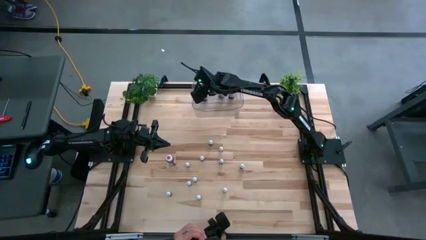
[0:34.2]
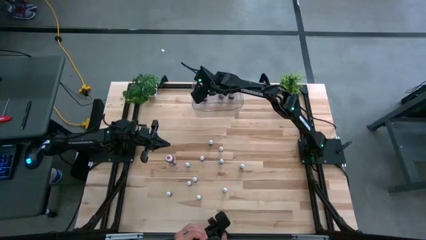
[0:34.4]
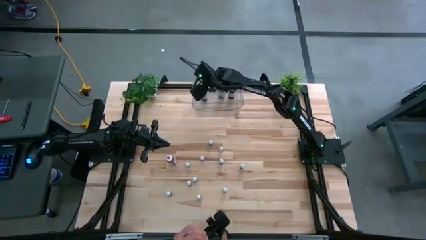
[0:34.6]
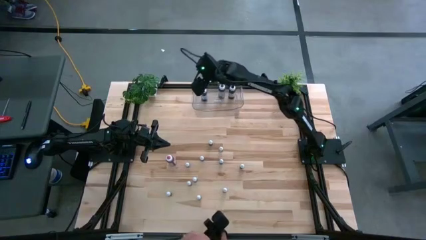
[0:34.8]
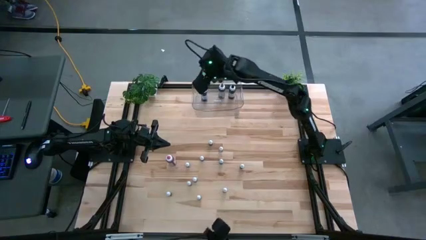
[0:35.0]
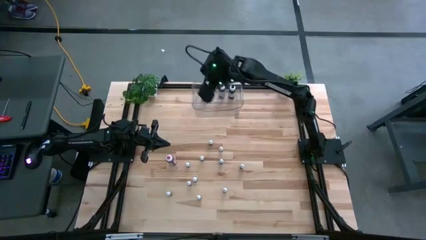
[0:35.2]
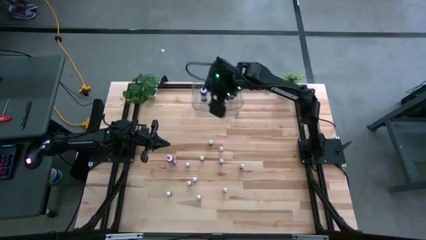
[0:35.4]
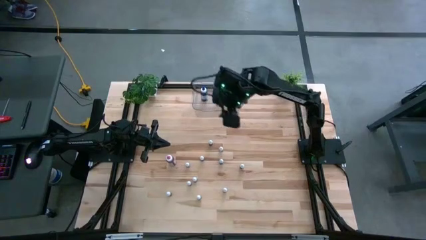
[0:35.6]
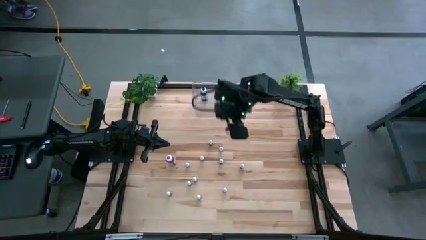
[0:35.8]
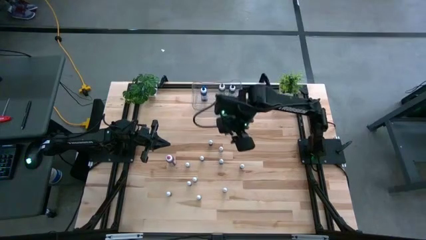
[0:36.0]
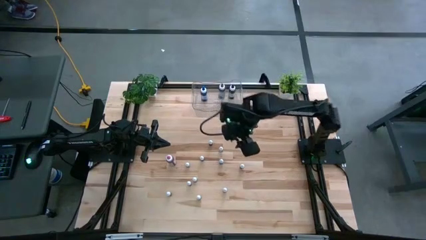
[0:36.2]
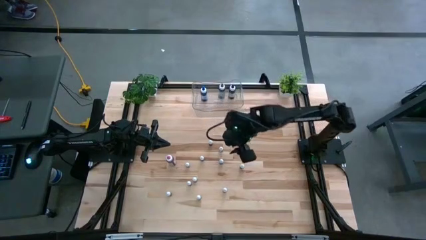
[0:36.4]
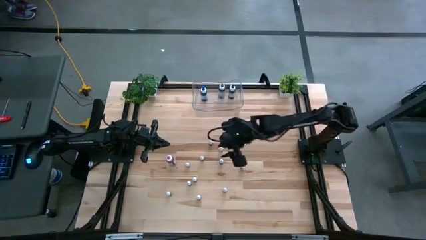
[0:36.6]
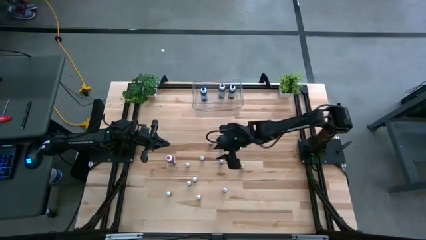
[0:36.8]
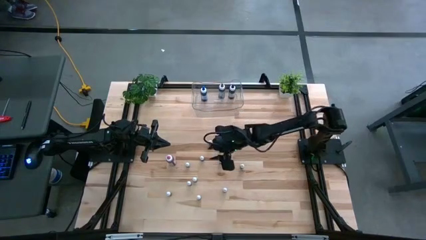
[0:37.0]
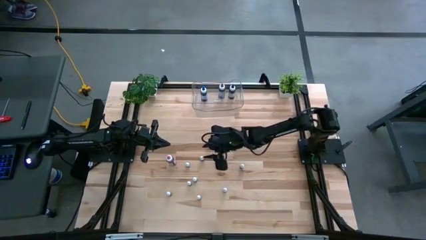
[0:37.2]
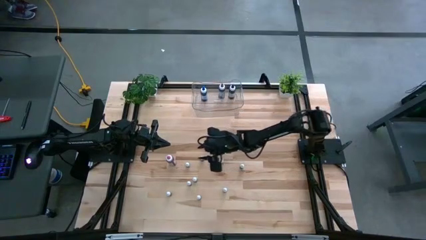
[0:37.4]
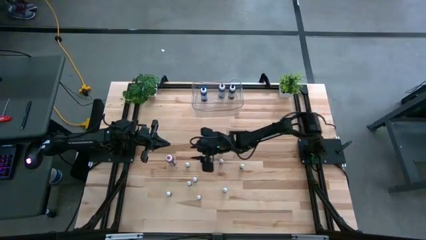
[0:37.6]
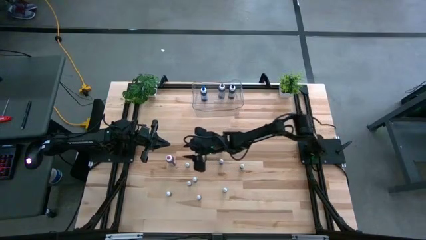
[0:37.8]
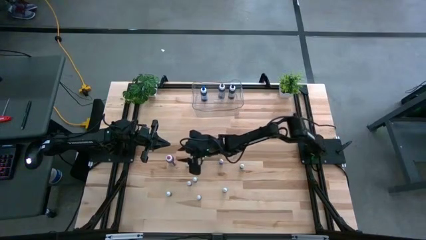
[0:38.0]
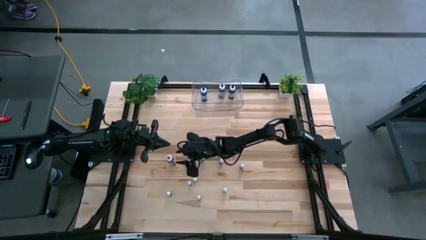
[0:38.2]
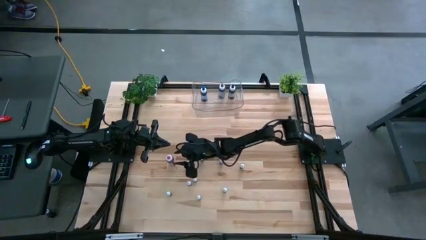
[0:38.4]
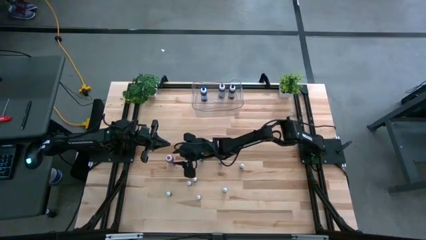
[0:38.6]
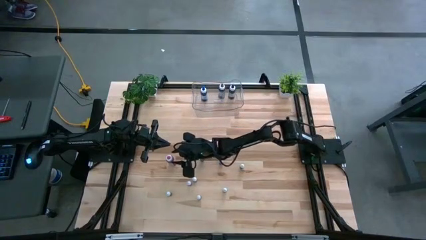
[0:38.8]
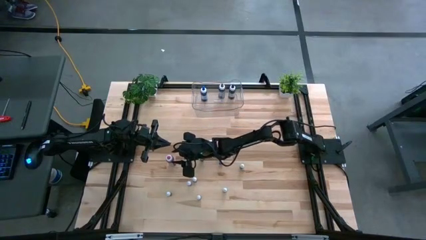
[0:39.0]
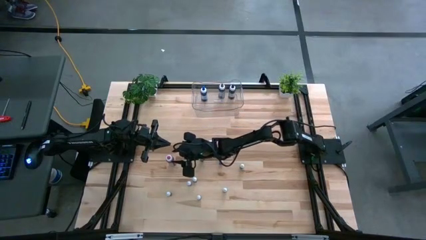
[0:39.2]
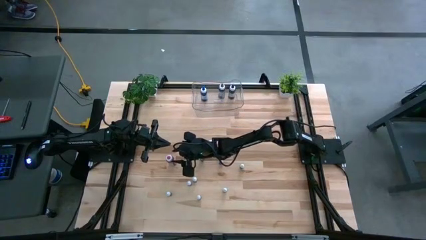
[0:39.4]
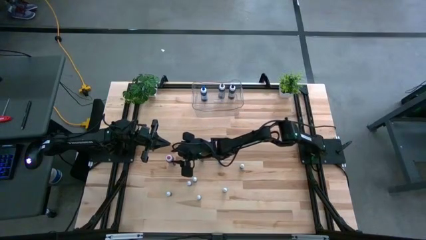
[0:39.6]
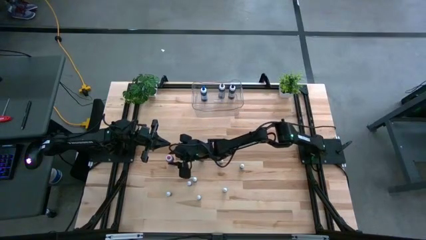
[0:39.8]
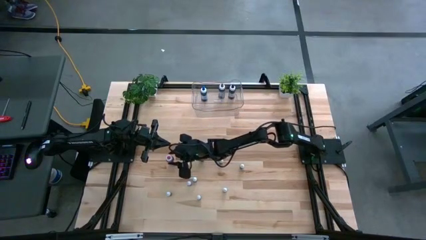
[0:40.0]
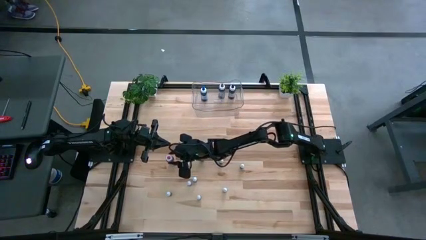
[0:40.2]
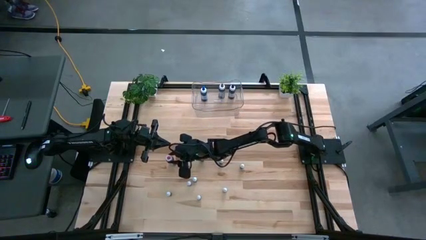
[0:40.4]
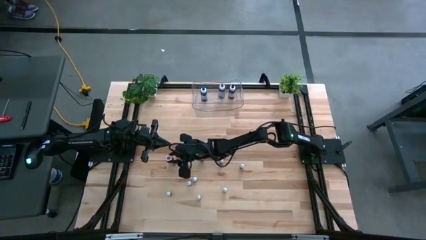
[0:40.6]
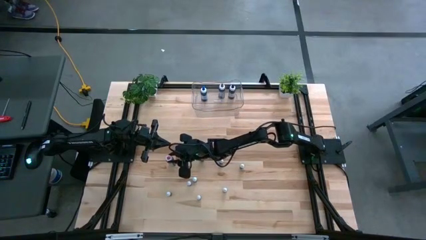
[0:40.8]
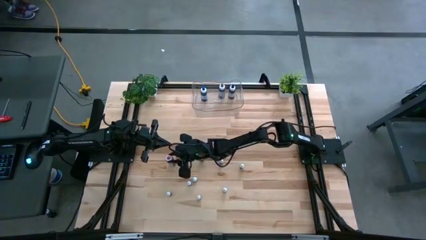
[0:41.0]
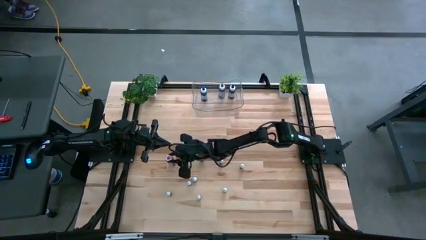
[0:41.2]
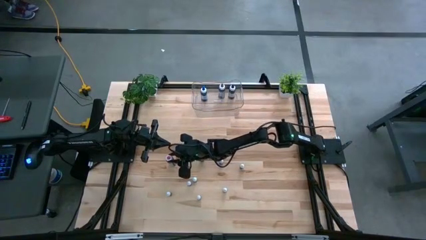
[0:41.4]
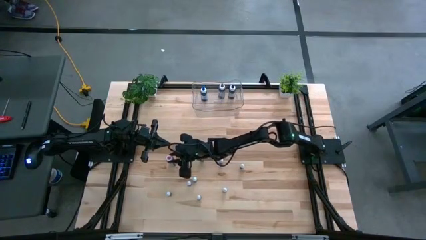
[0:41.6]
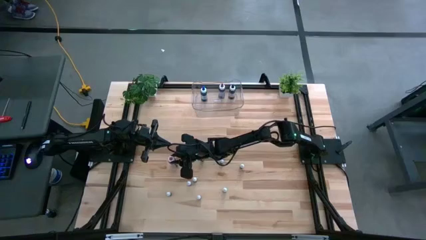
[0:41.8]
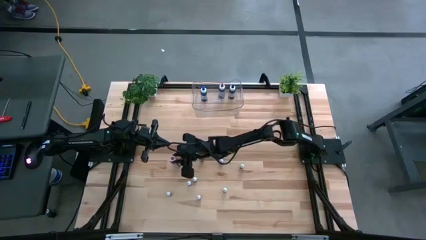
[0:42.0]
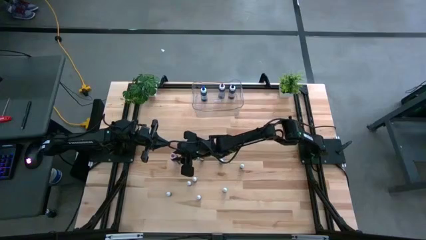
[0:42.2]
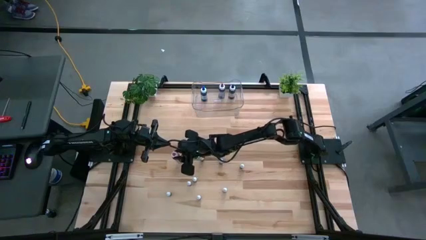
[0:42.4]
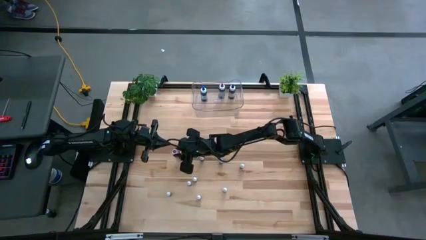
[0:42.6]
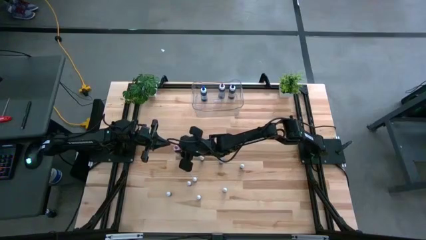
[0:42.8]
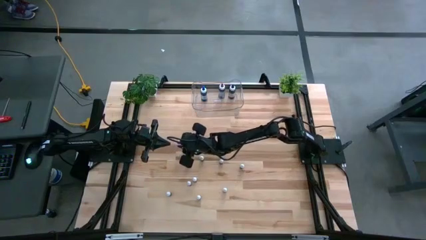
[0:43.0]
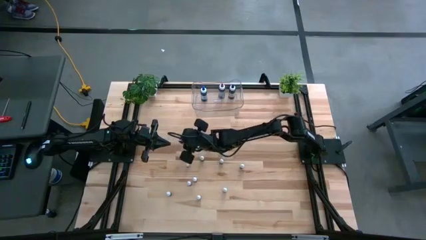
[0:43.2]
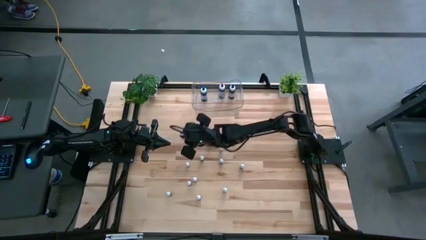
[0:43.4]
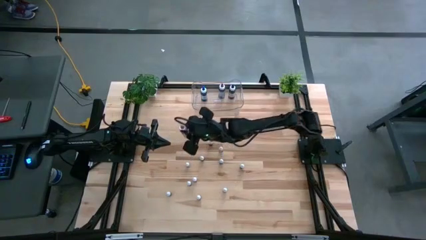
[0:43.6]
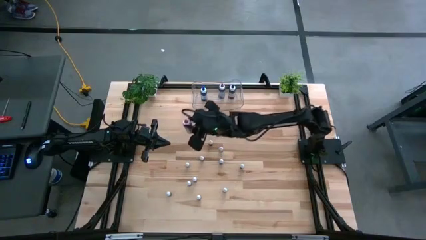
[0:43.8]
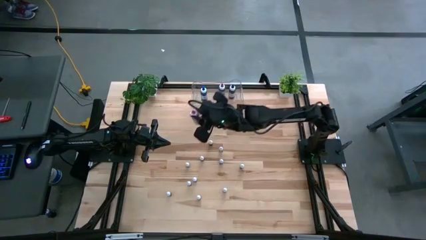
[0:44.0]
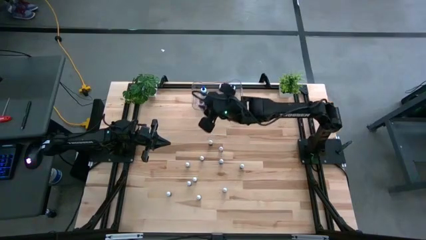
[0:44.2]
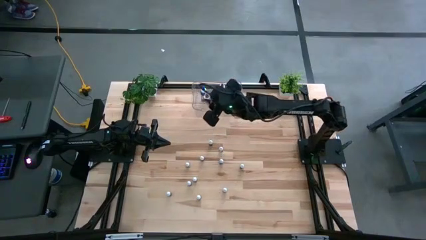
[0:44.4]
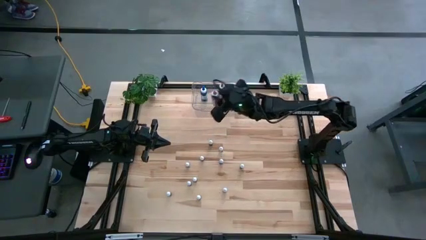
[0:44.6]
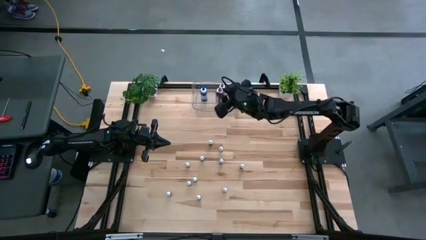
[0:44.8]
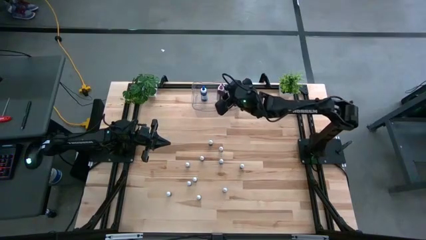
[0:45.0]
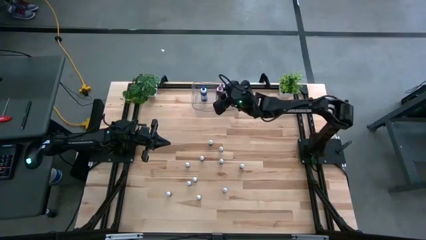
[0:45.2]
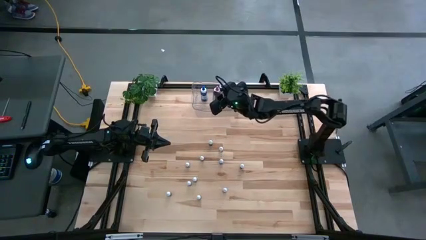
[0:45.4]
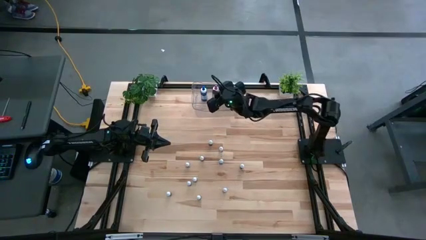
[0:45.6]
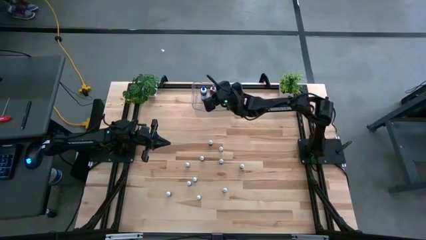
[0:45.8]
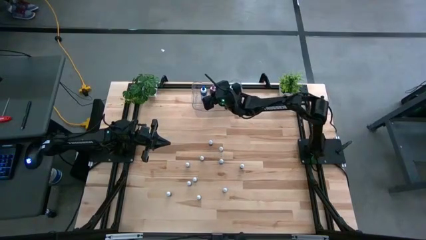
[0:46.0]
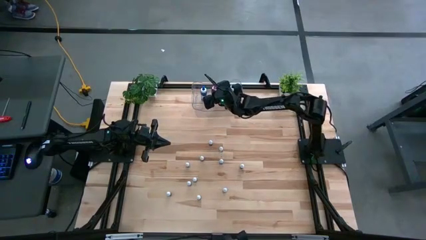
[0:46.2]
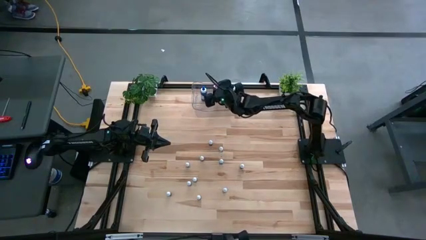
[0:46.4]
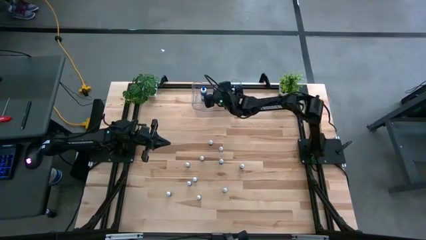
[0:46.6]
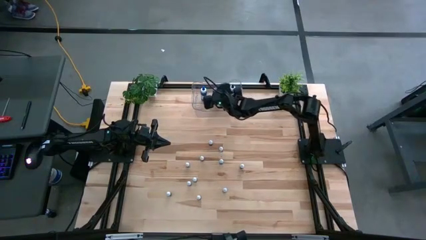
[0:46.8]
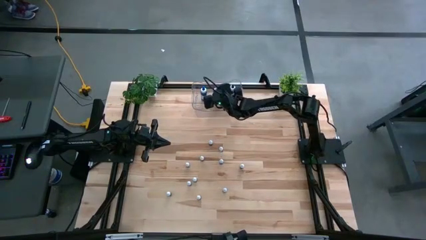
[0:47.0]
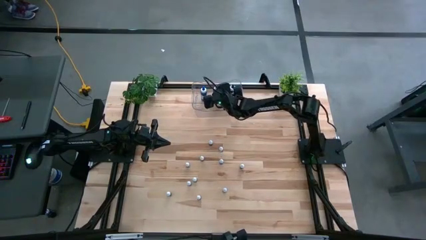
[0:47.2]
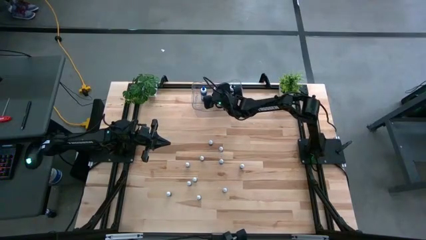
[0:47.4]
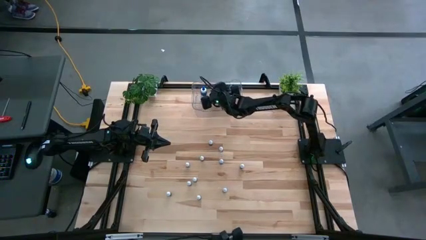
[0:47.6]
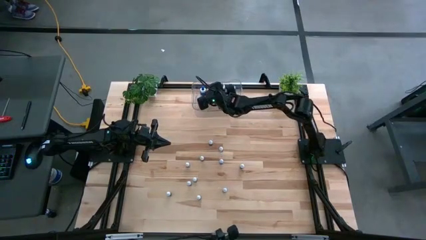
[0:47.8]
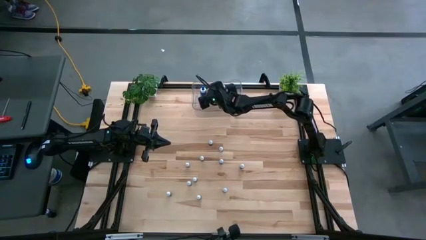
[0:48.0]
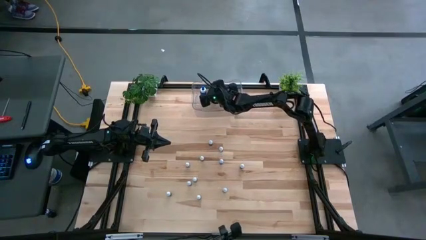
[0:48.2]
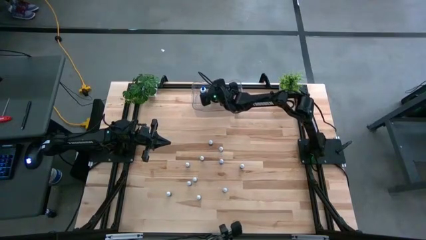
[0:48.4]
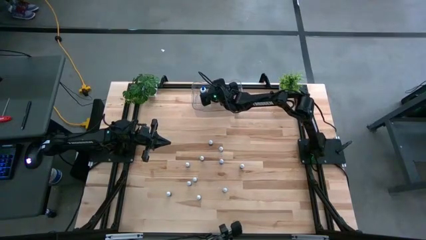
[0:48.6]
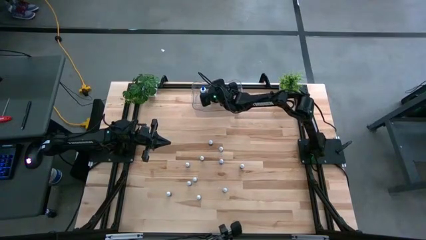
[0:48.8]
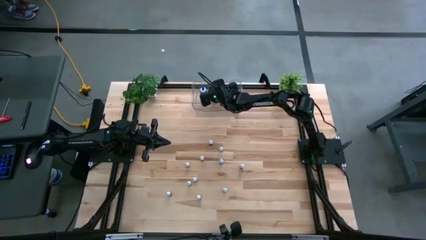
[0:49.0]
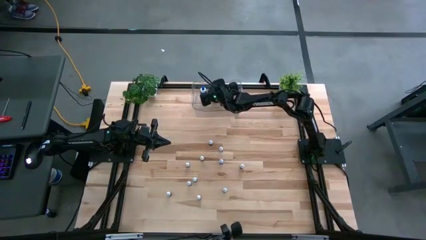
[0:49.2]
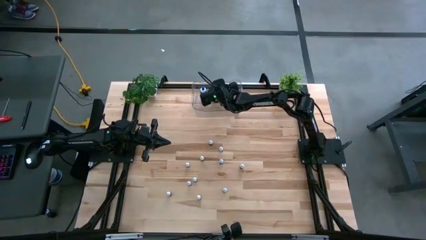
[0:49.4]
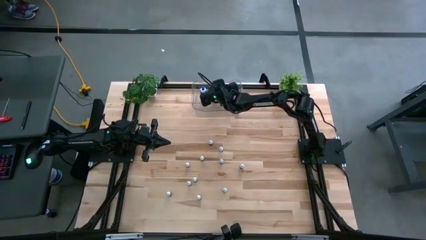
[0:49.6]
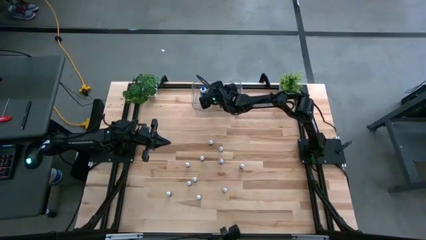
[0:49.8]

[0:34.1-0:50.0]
Task: Pick & Place food coloring
Put the large pink food coloring bottle into the transparent bin
